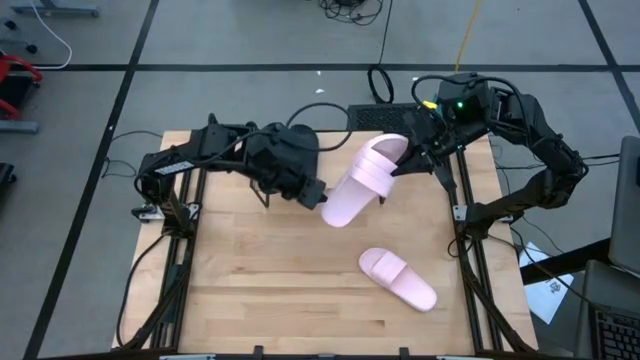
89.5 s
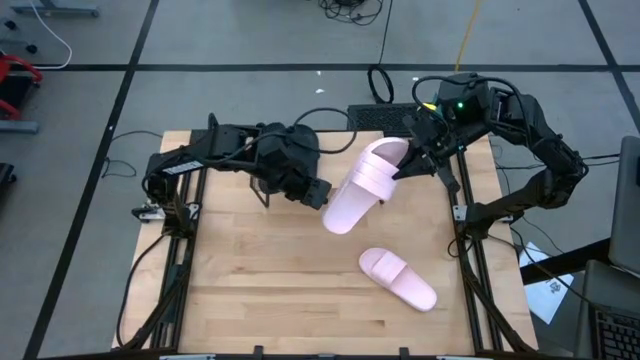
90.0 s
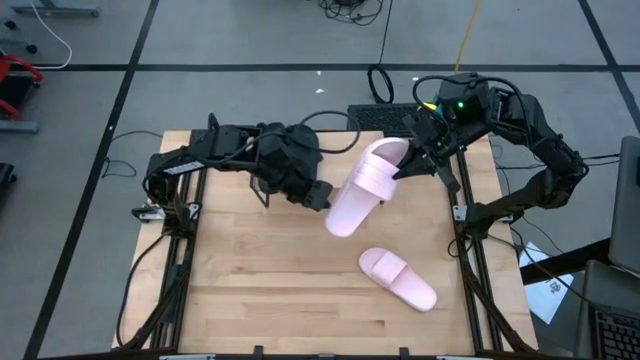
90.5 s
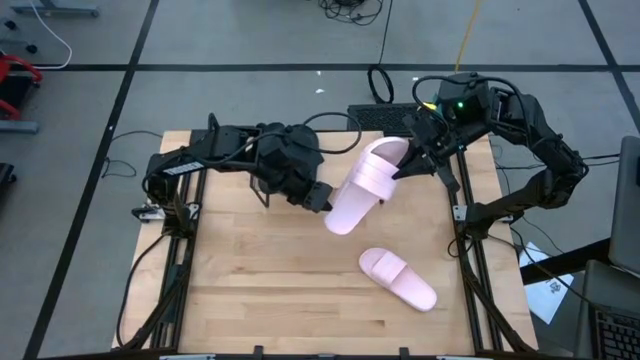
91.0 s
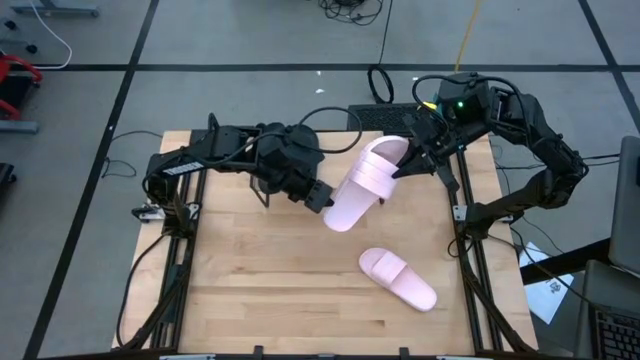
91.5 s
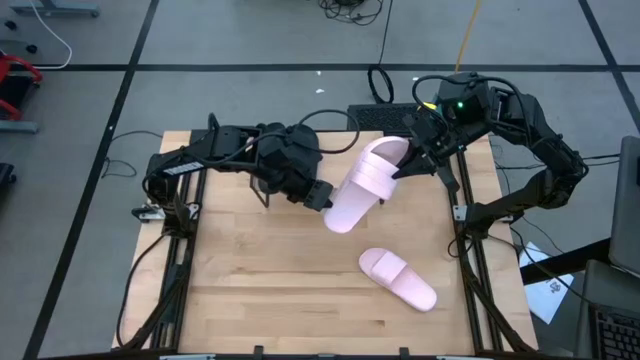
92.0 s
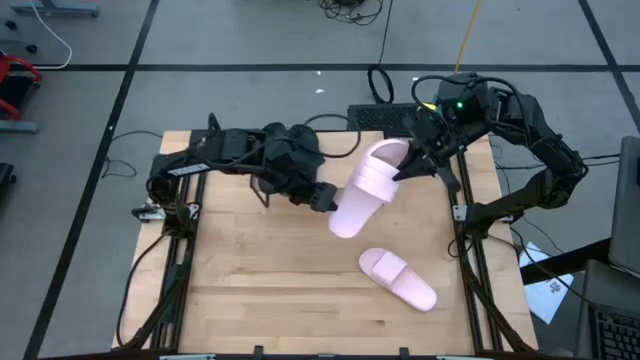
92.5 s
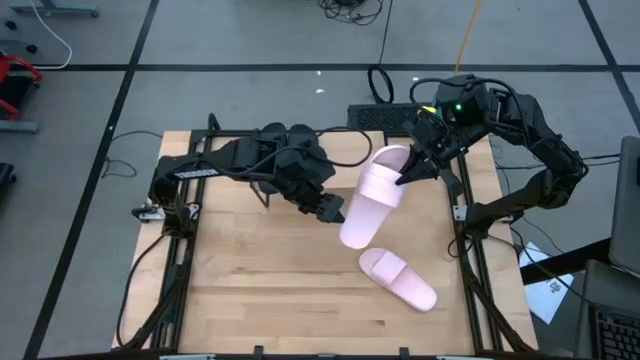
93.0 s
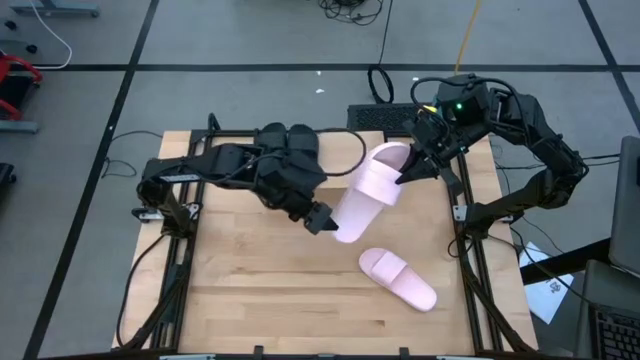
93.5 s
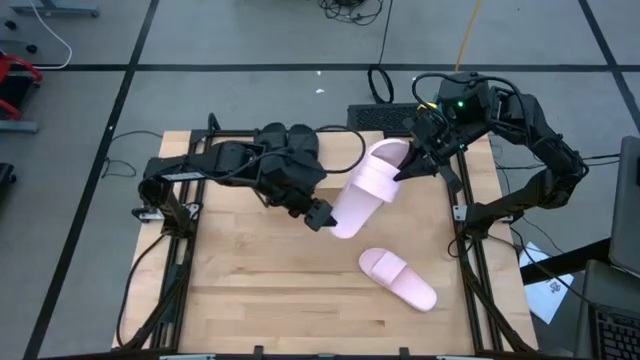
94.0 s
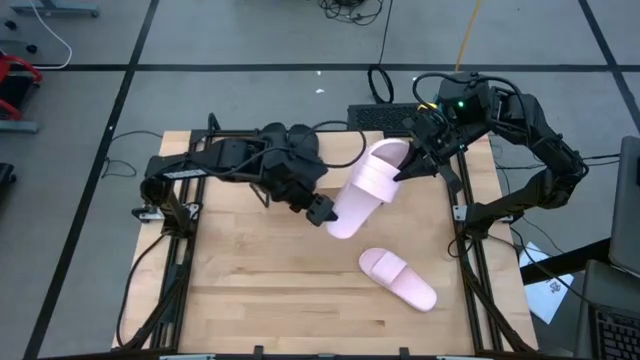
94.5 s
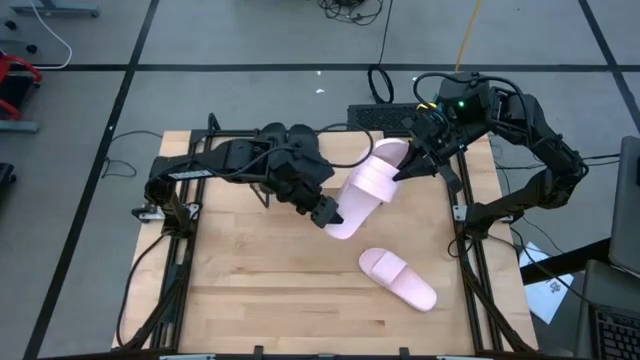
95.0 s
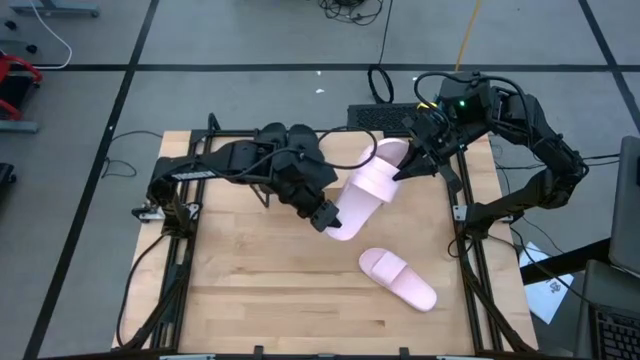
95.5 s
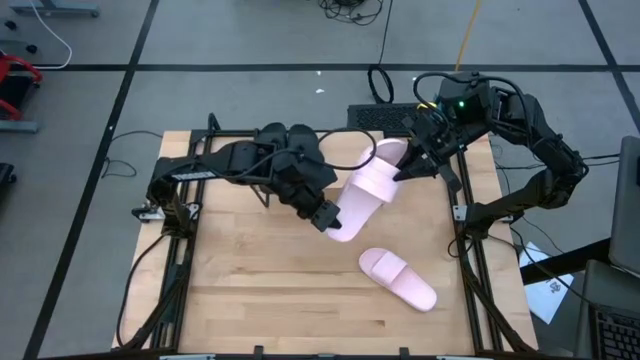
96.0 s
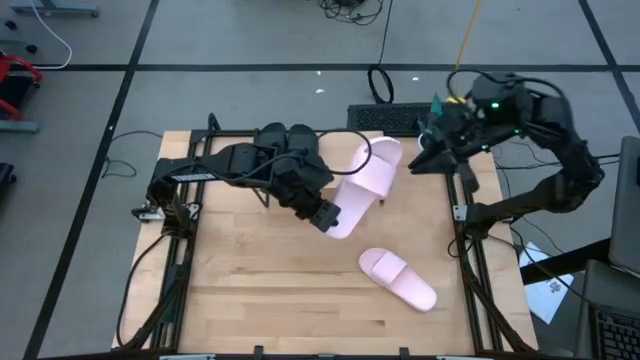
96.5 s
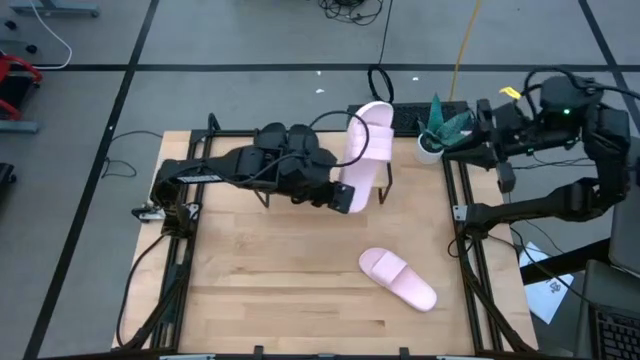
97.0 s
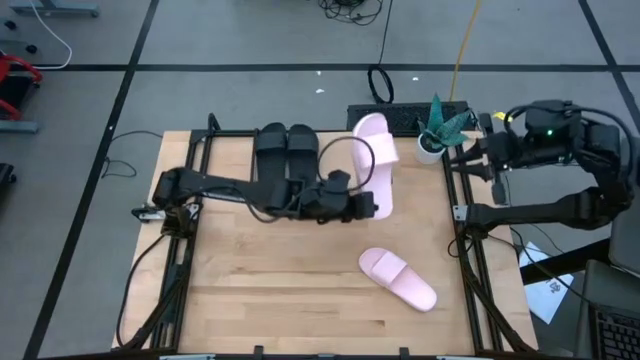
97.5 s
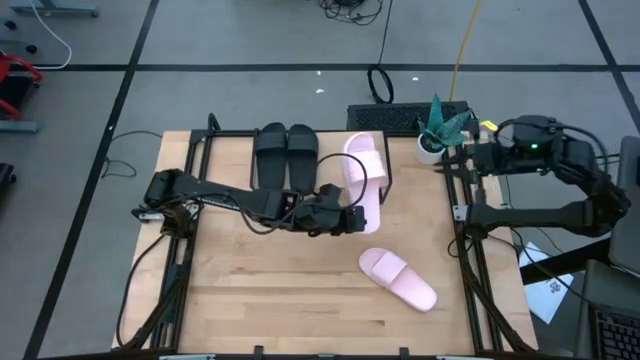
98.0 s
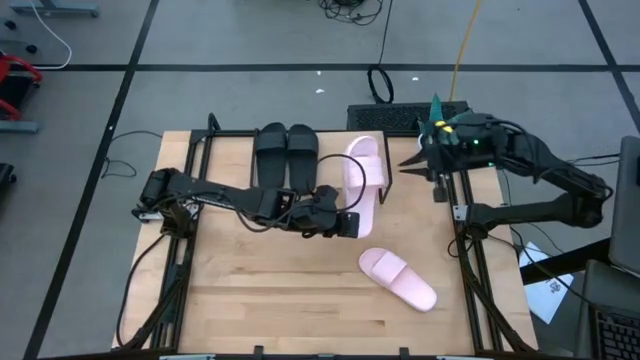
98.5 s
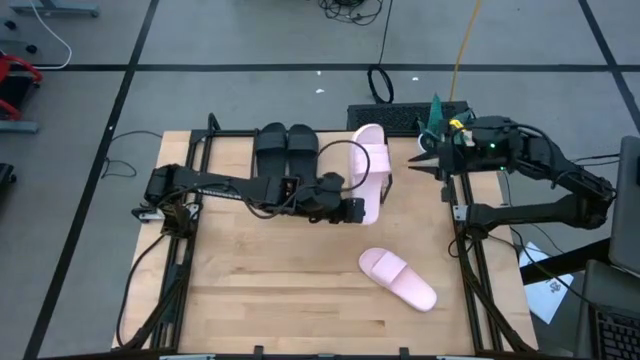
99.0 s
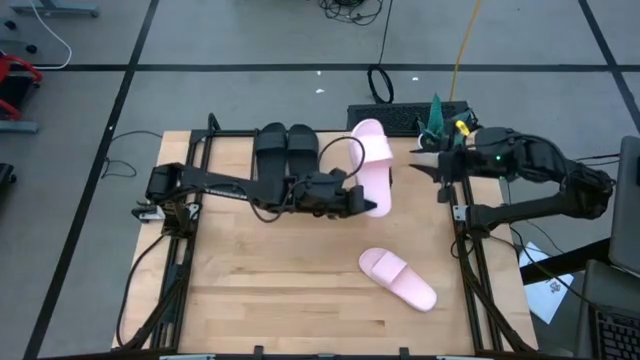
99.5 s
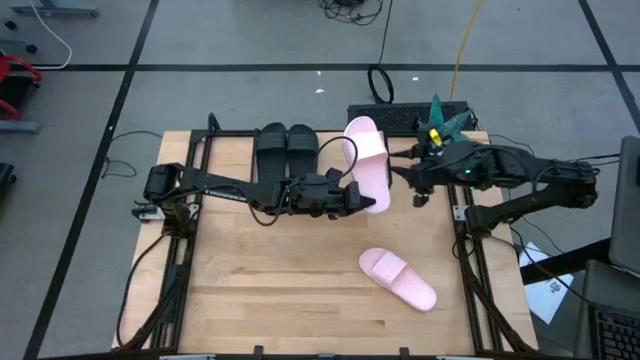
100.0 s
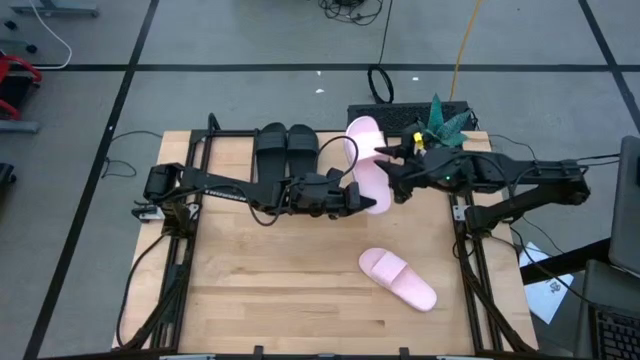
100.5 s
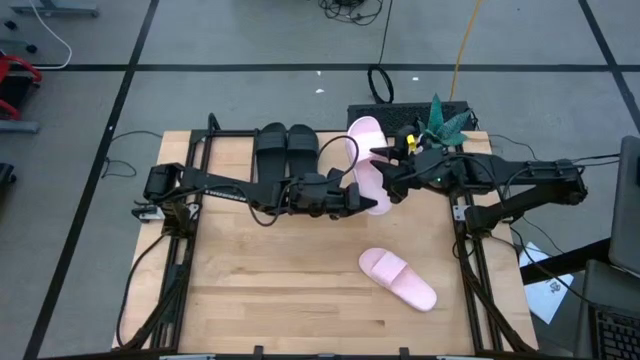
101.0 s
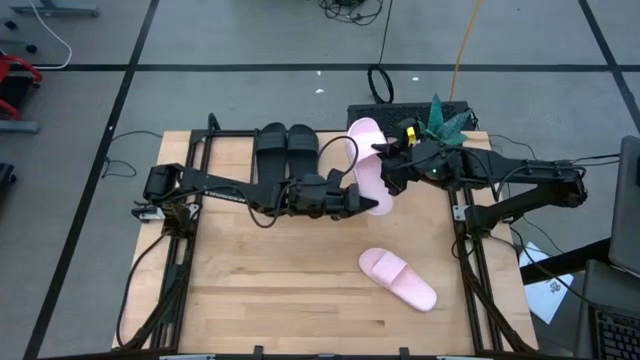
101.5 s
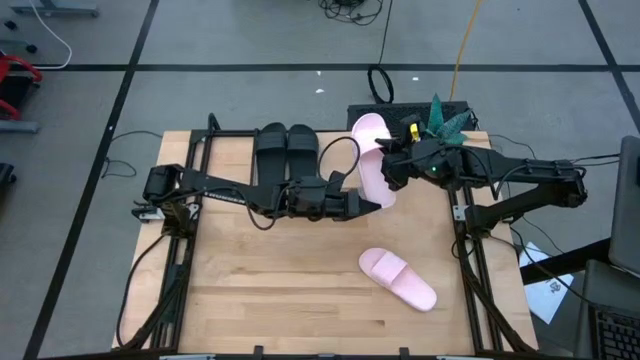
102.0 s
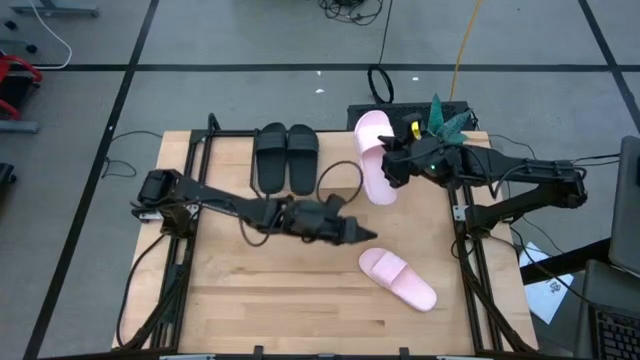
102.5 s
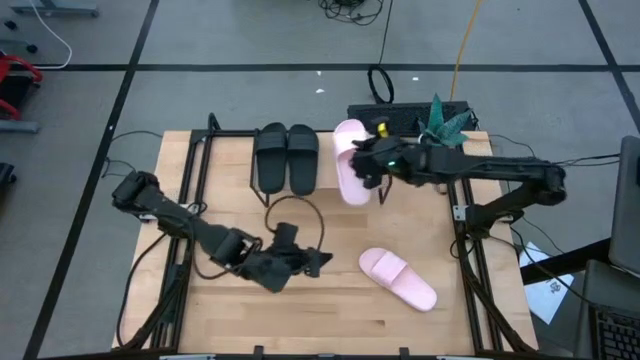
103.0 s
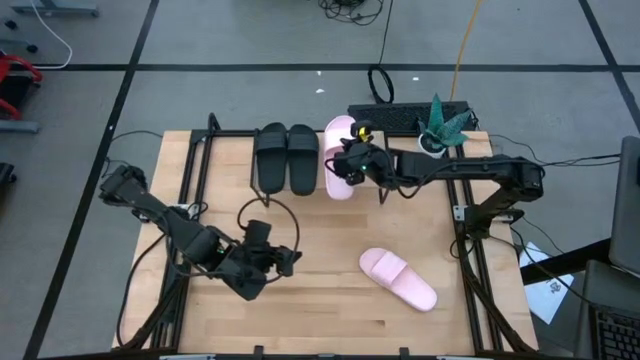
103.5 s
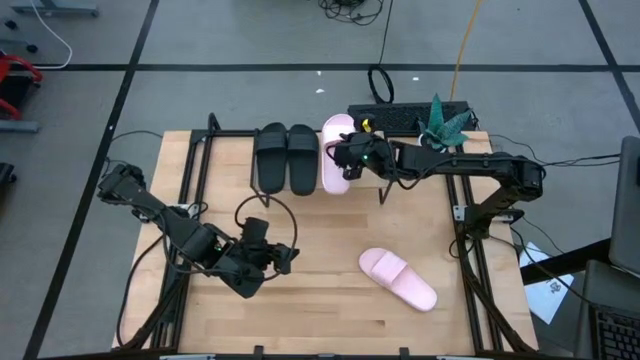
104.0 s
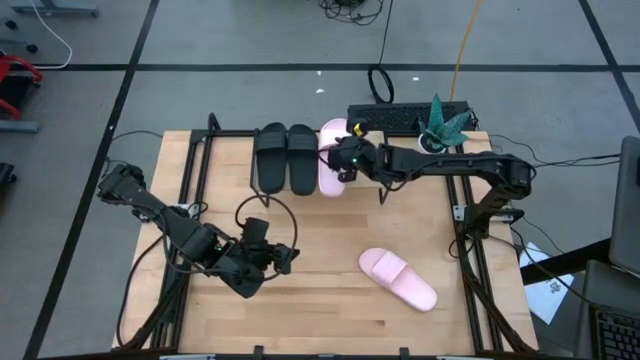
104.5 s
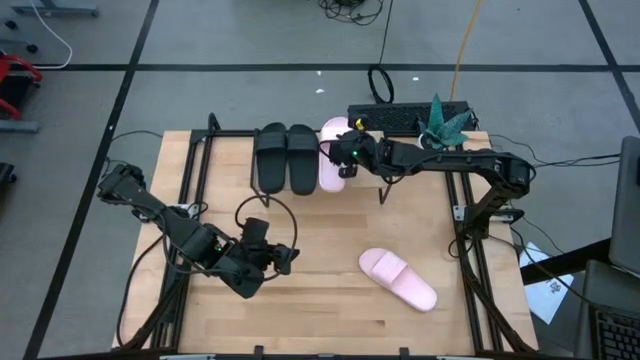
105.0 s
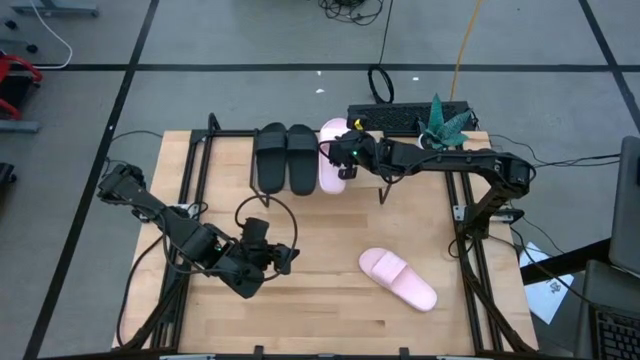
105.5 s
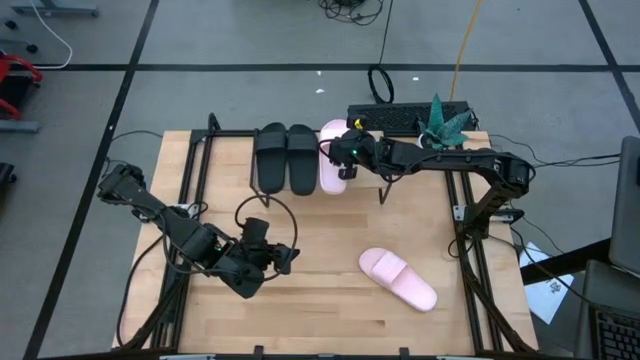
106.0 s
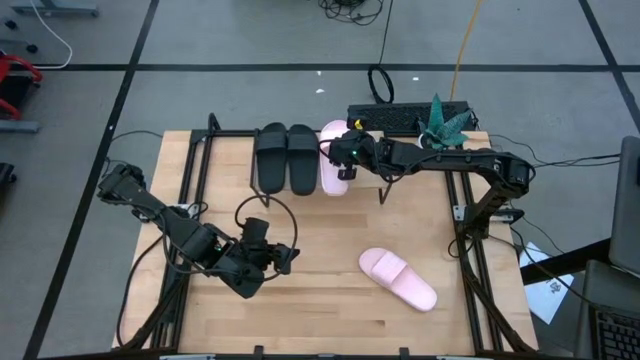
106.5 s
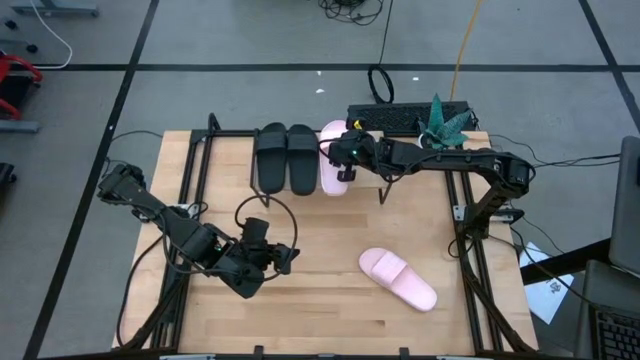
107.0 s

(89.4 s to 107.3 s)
Task: Pick and place slides into the shelf
Put the left pink slipper on the shelf

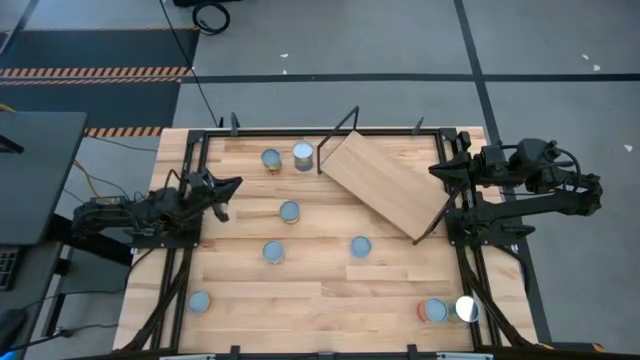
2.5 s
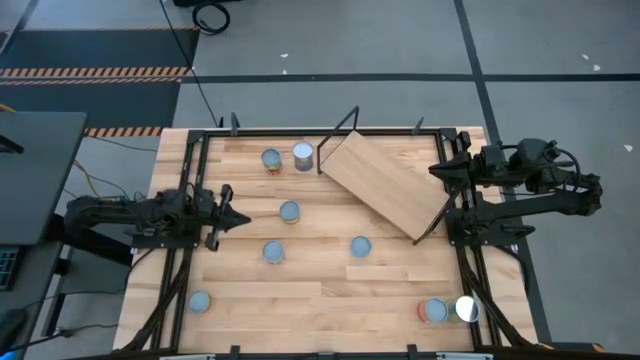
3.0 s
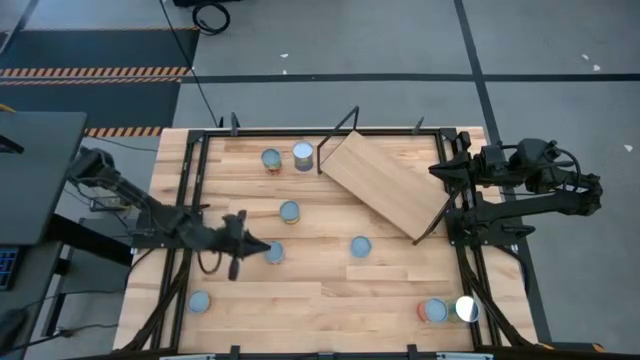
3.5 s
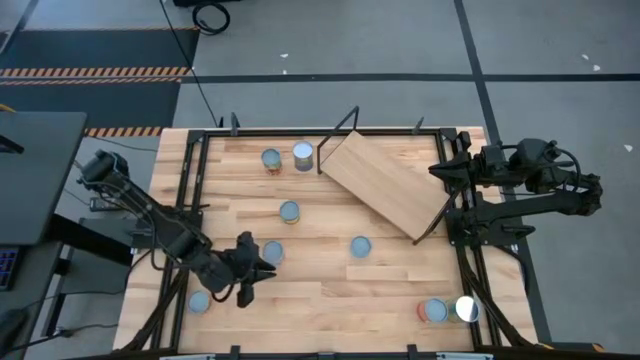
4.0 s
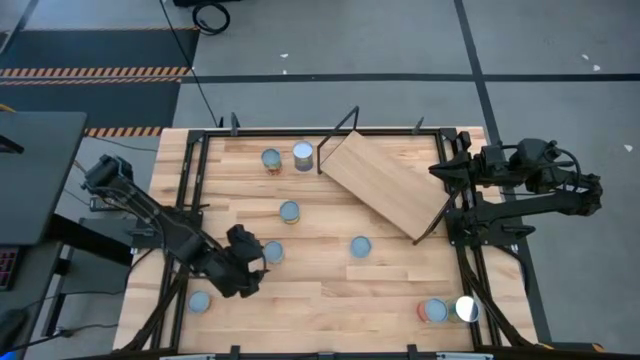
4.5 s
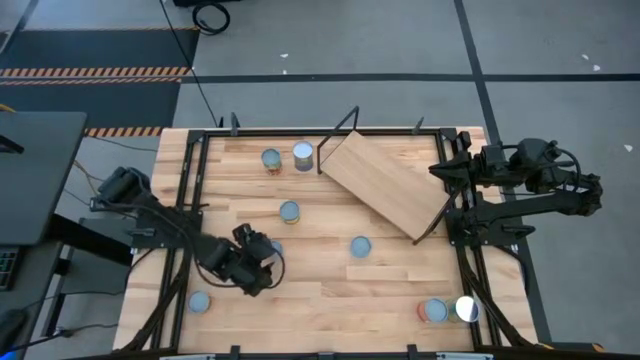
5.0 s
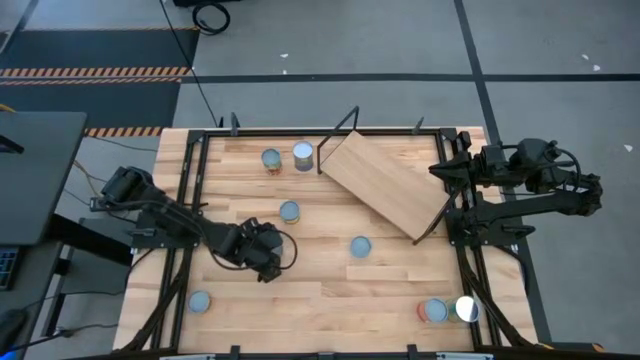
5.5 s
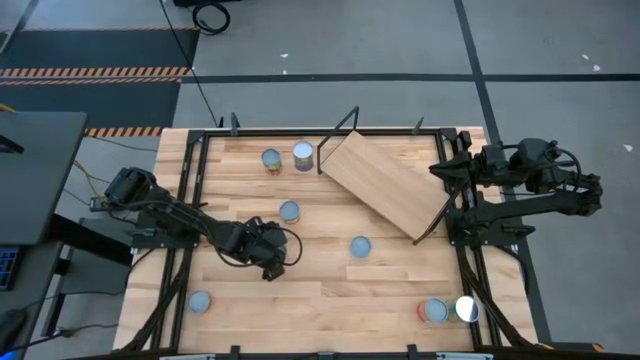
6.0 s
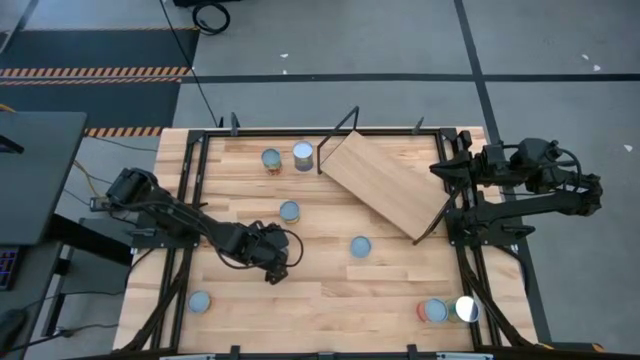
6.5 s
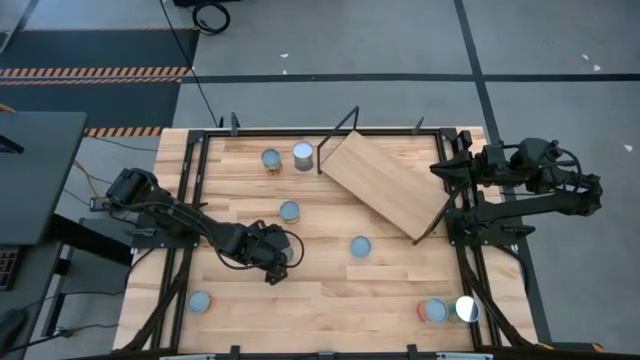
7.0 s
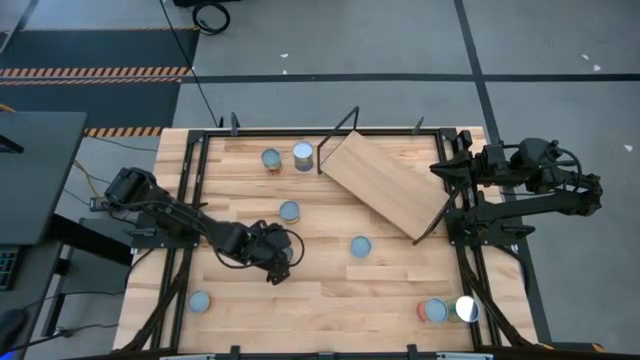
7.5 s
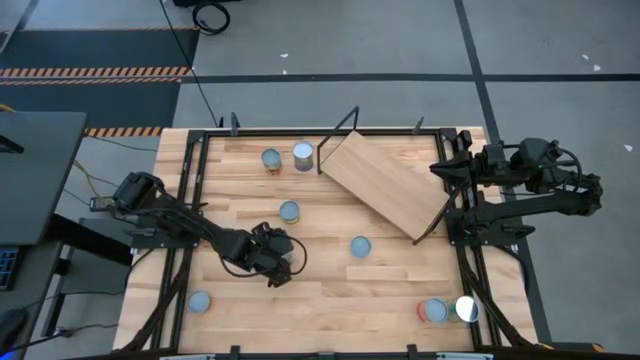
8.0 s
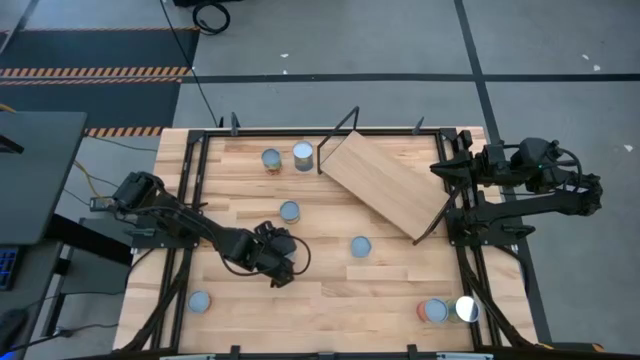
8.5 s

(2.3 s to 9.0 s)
Task: Pick and place cans onto a shelf
Put the canned diced tomatoes on the shelf
